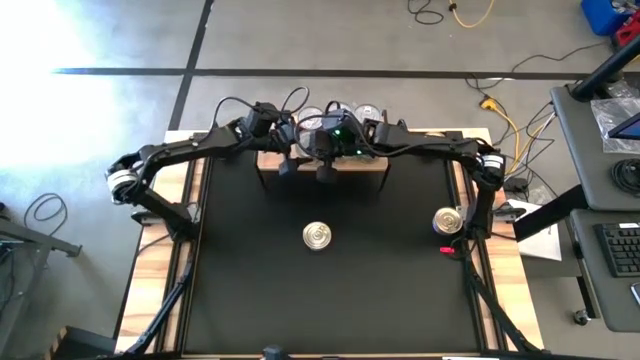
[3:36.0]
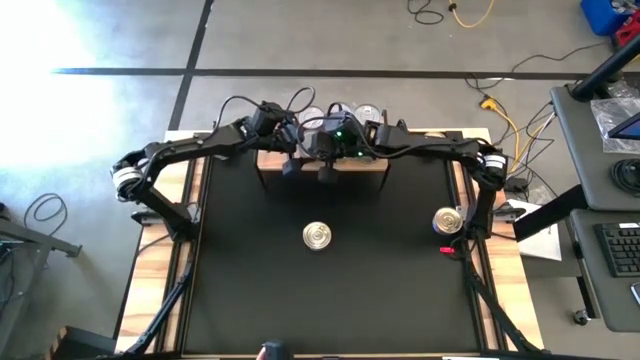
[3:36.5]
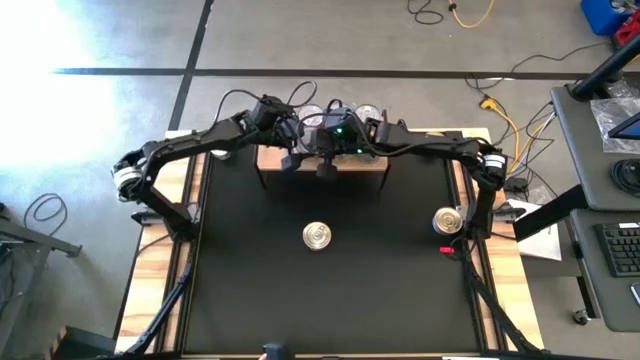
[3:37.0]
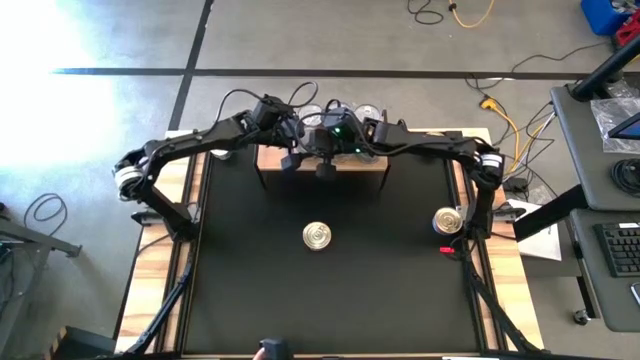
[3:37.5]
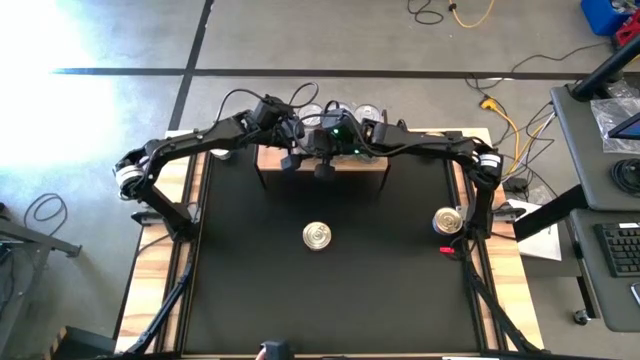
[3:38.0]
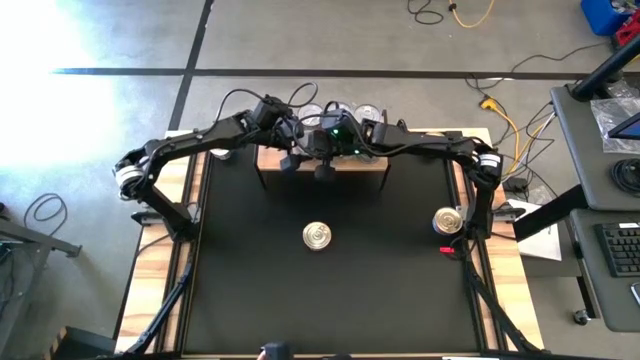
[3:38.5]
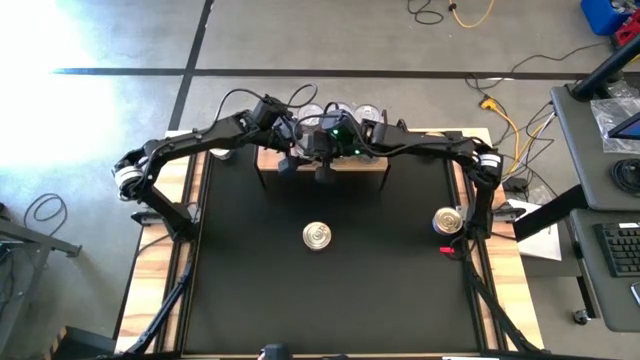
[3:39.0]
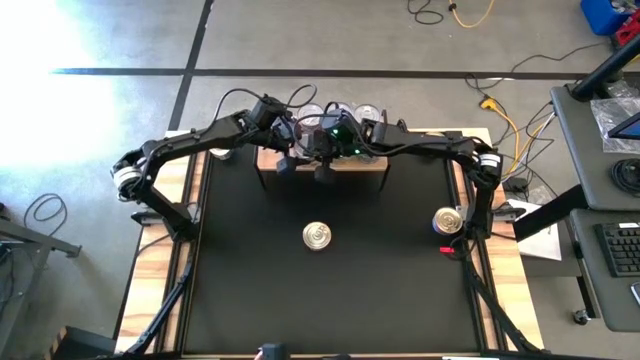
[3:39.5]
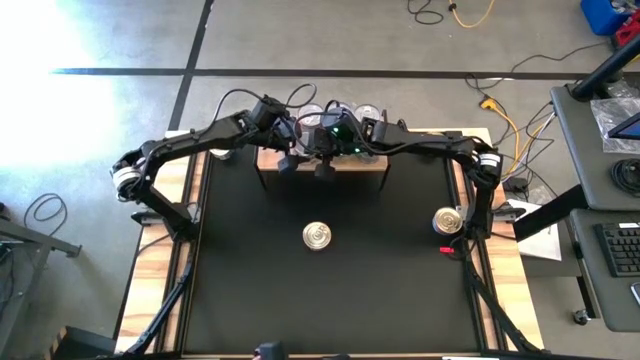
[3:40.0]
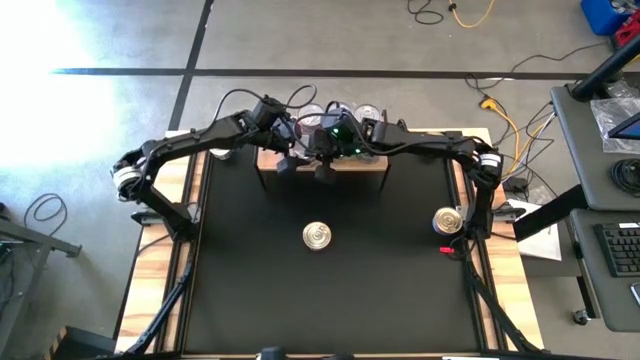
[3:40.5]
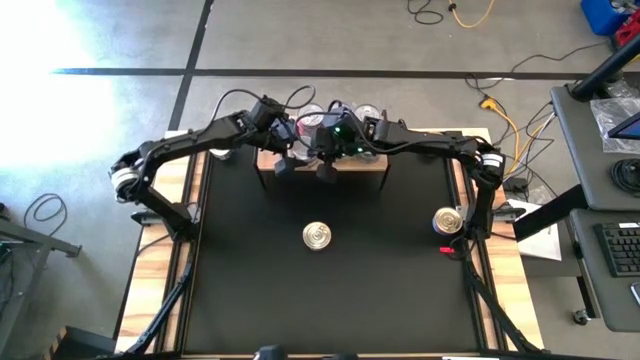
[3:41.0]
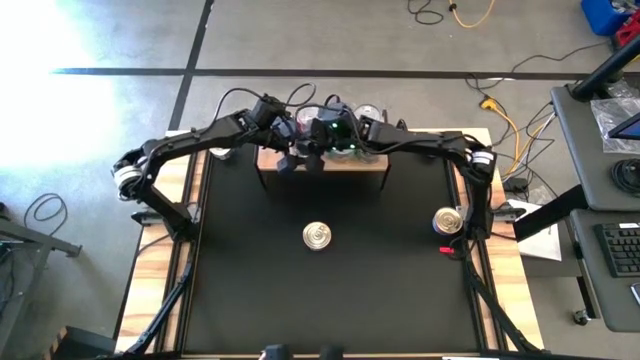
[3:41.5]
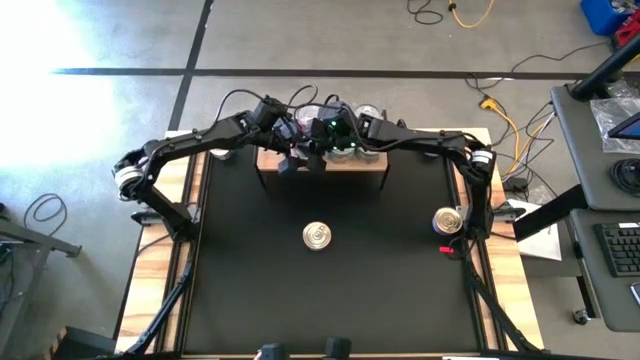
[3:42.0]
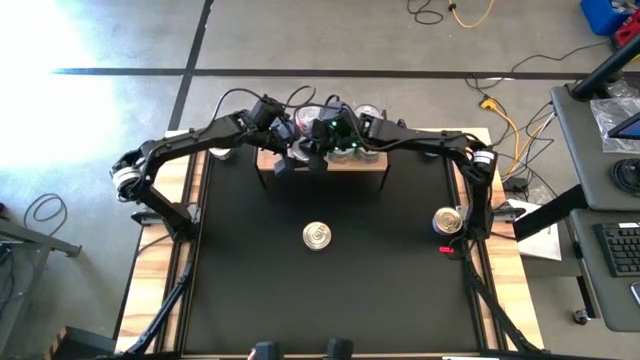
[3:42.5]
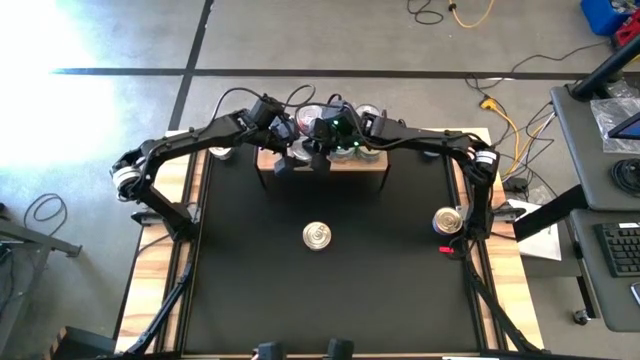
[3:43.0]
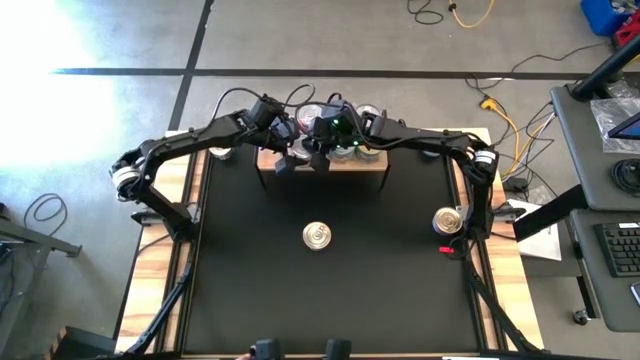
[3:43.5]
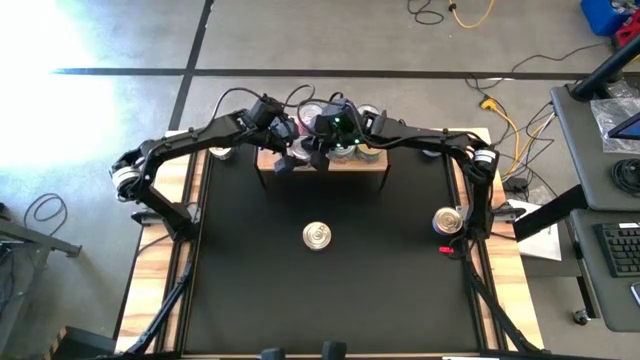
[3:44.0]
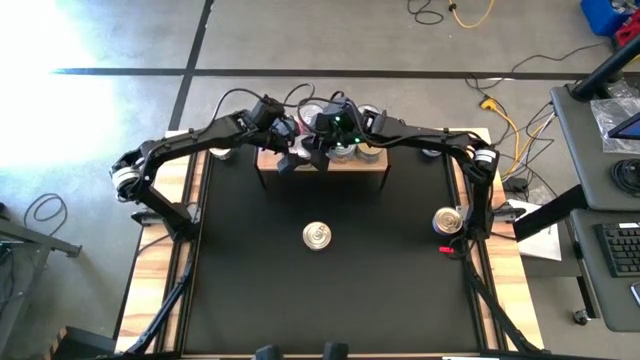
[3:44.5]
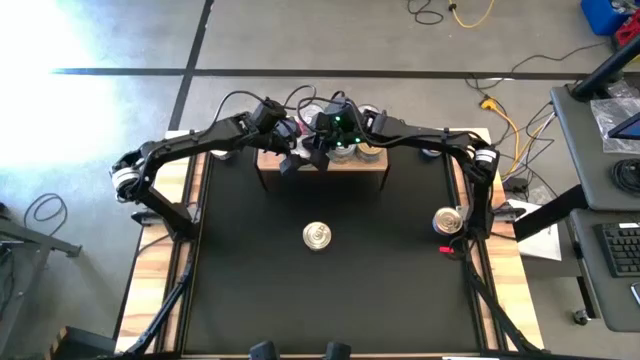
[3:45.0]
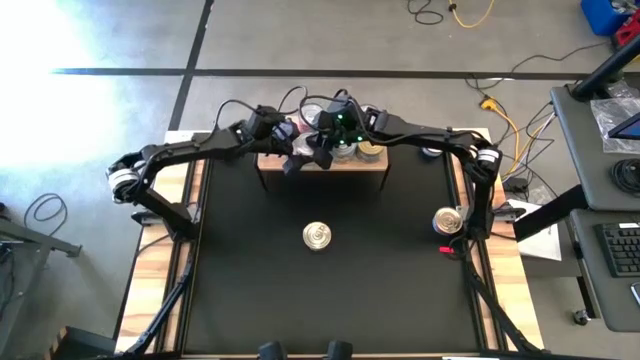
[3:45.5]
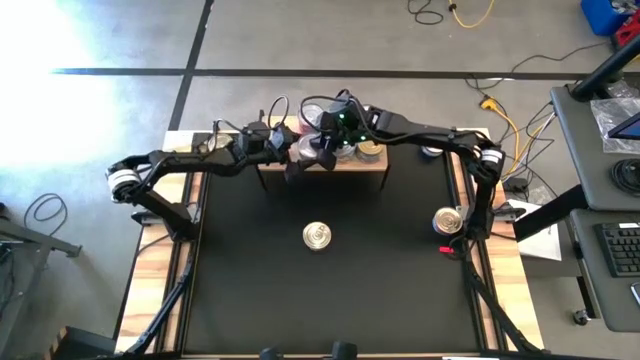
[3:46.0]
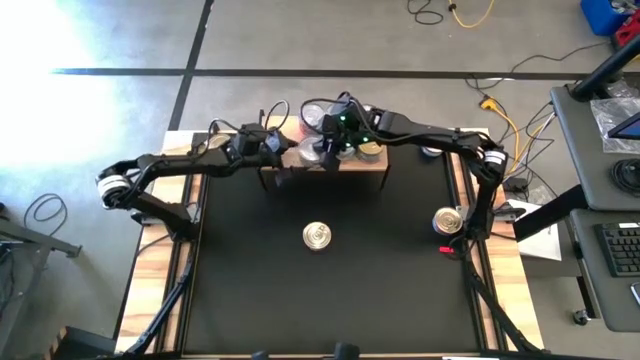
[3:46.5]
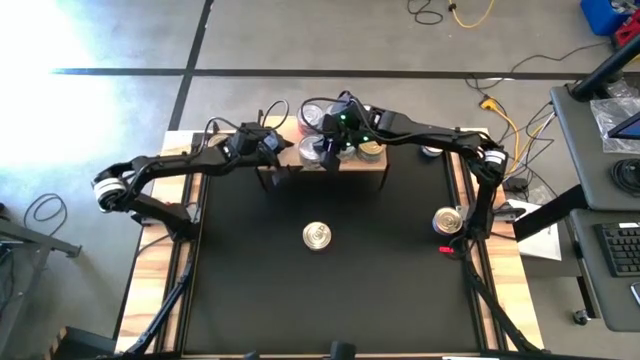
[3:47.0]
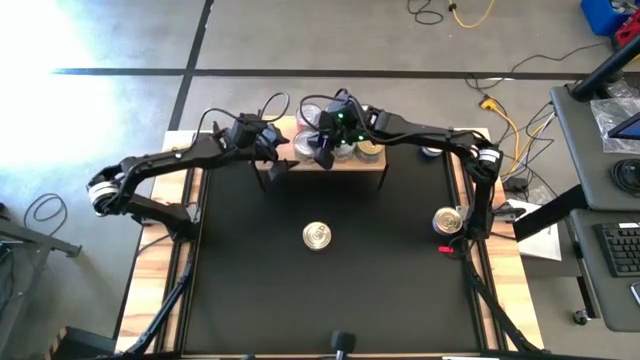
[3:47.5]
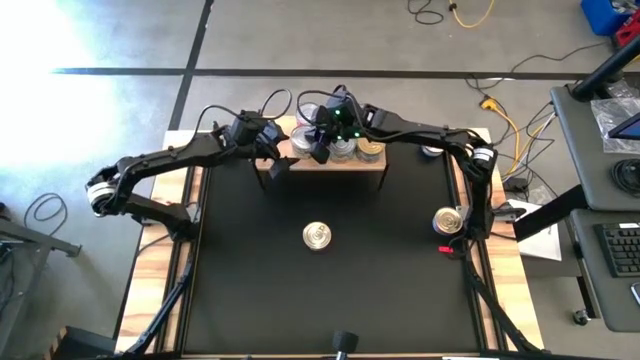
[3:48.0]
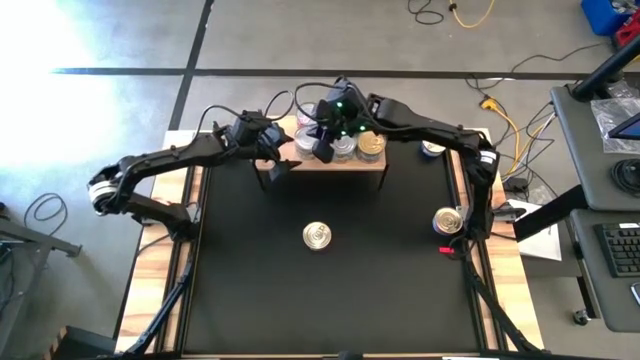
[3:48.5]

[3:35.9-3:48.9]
Task: Stack canned seafood by type on shelf
Stack the white green tuna can on top of the white green tuna can on the shelf

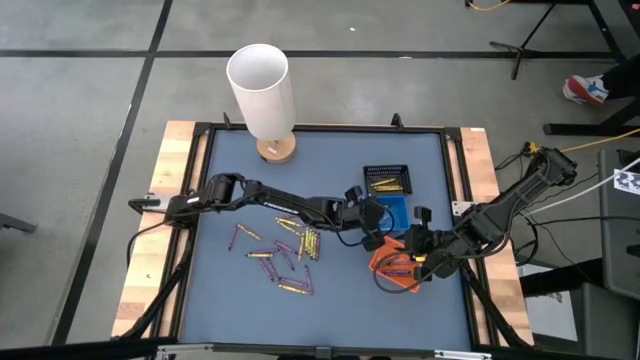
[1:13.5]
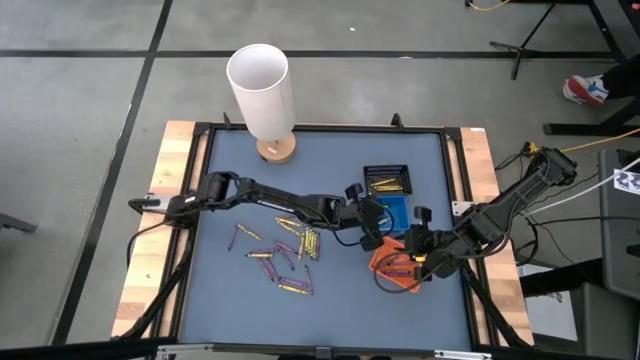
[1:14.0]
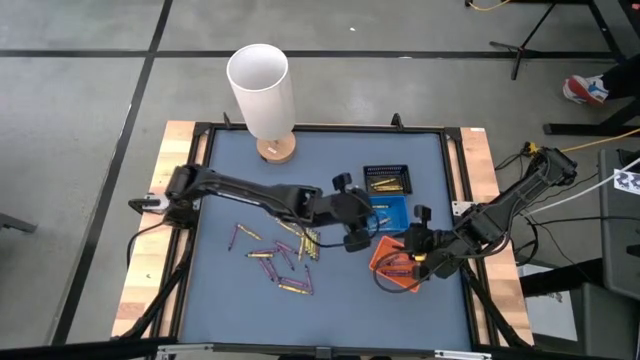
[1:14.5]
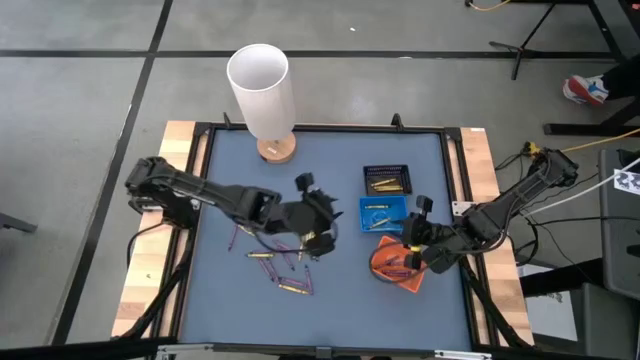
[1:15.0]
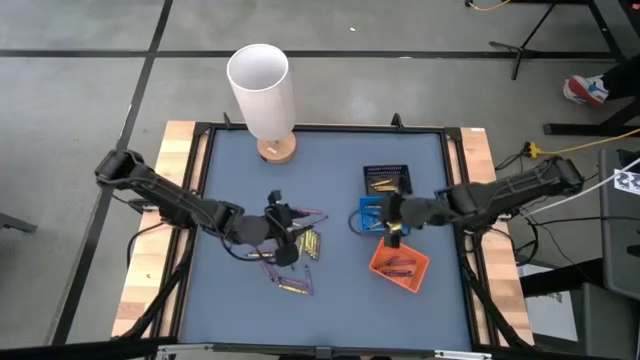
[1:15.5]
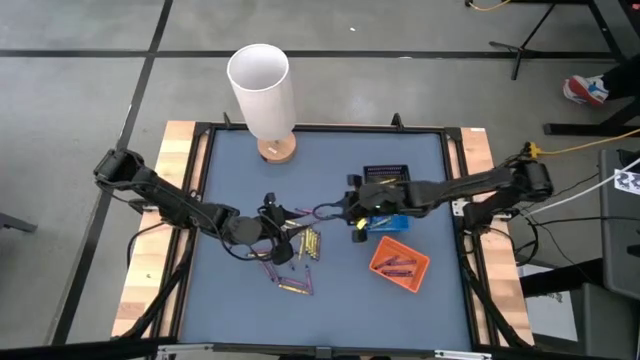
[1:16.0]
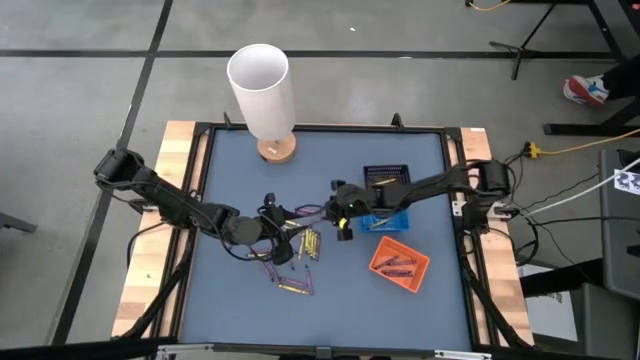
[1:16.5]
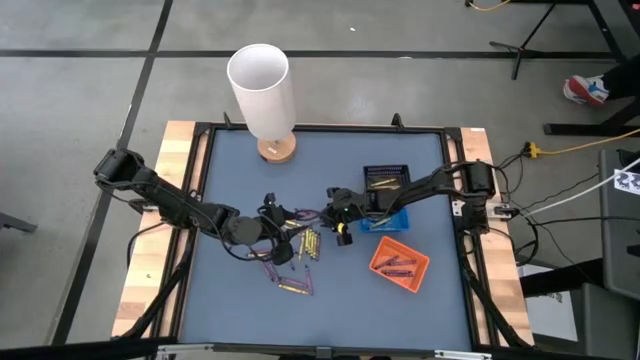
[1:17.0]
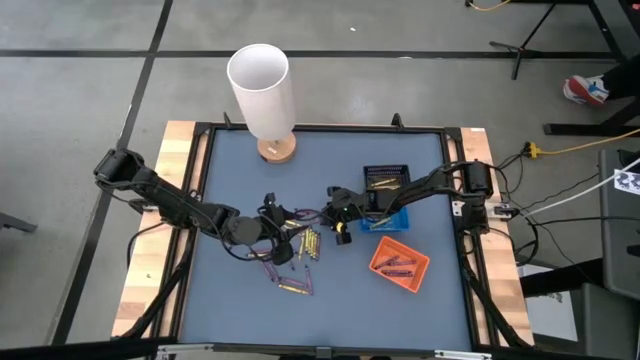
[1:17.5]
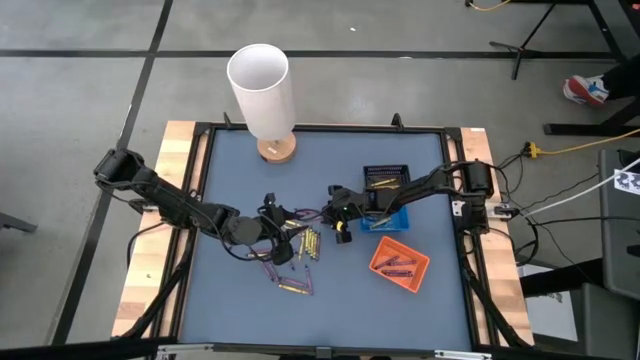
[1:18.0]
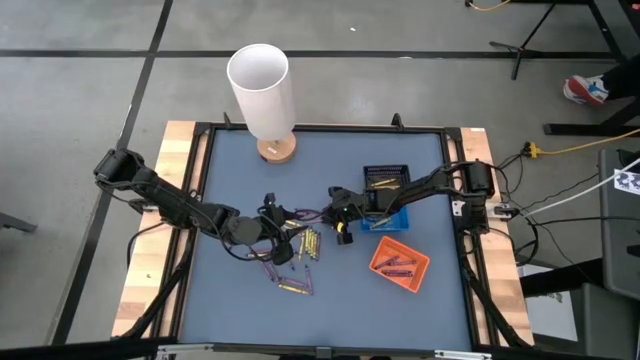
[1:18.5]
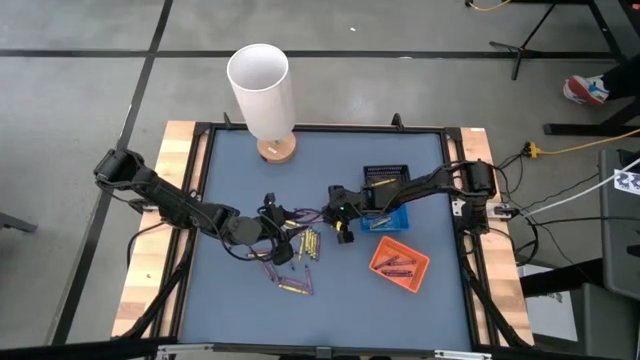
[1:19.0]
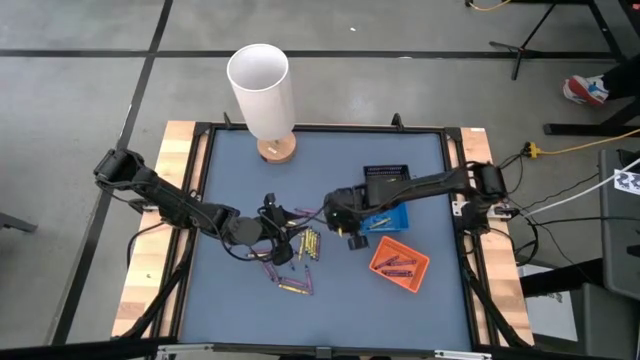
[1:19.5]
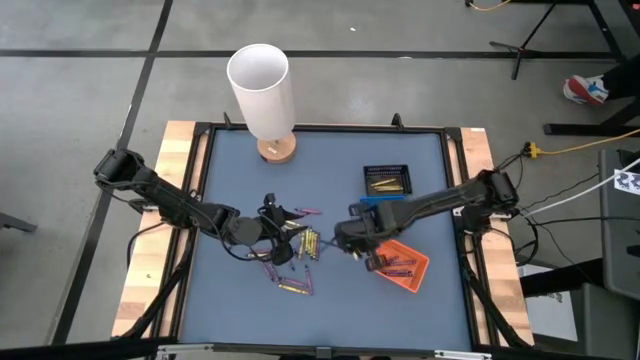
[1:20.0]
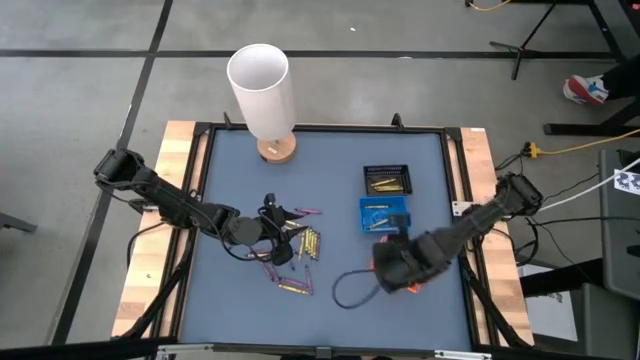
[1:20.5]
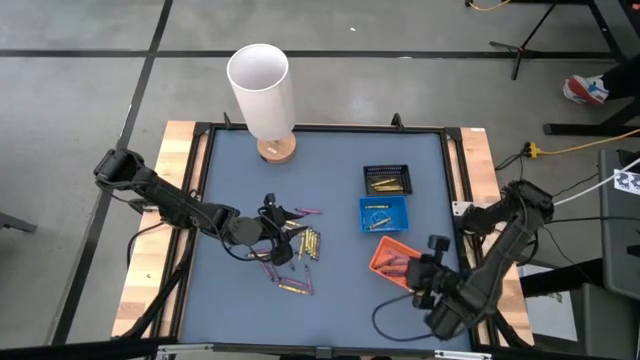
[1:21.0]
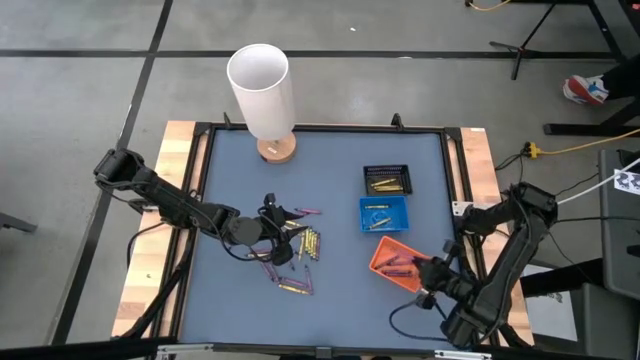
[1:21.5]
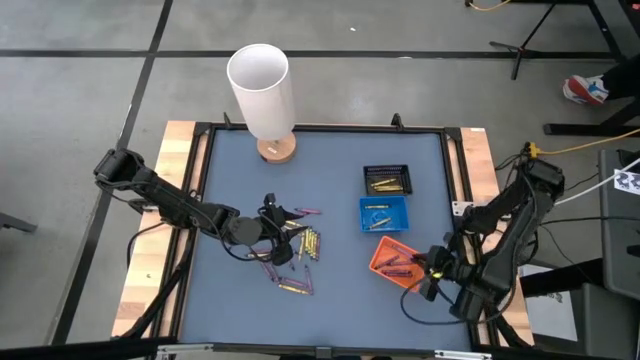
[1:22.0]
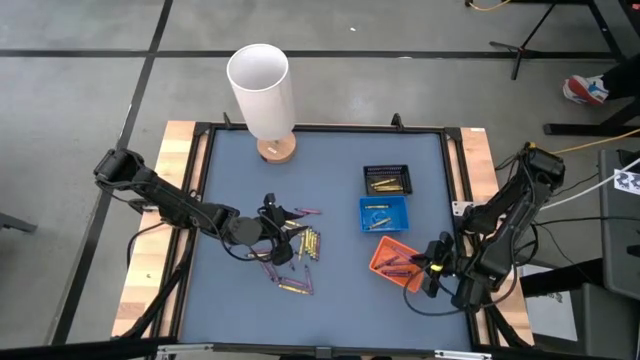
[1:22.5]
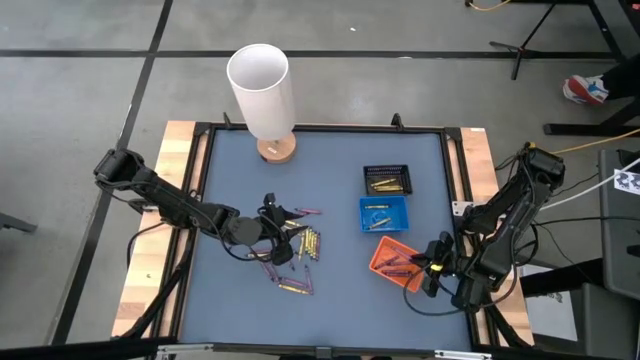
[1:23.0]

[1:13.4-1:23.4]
Task: Sort crayons
Put the purple crayon into the orange bin
